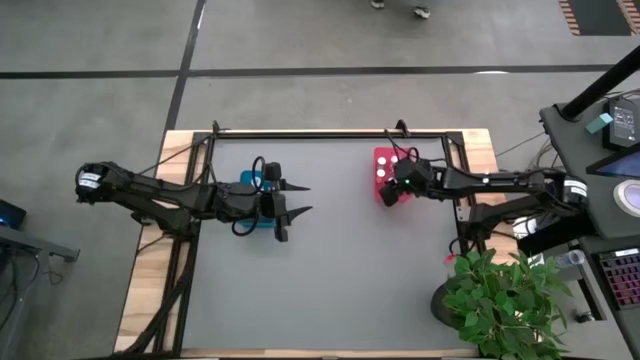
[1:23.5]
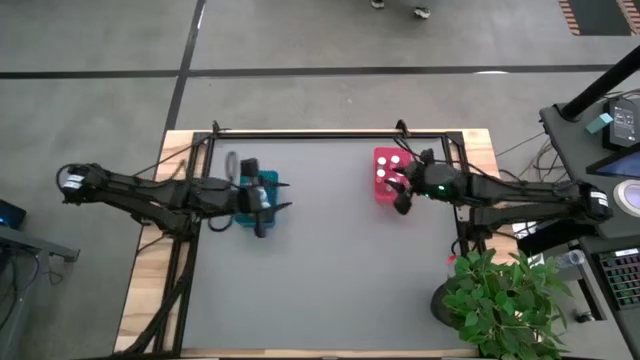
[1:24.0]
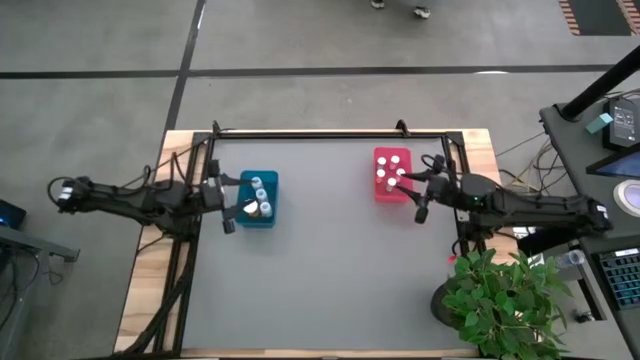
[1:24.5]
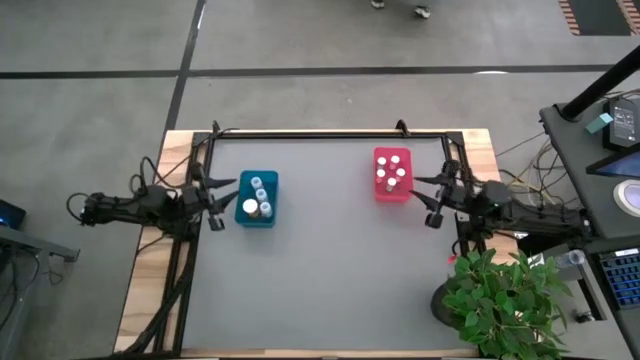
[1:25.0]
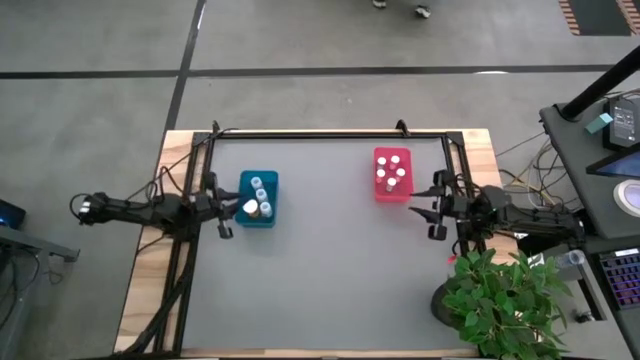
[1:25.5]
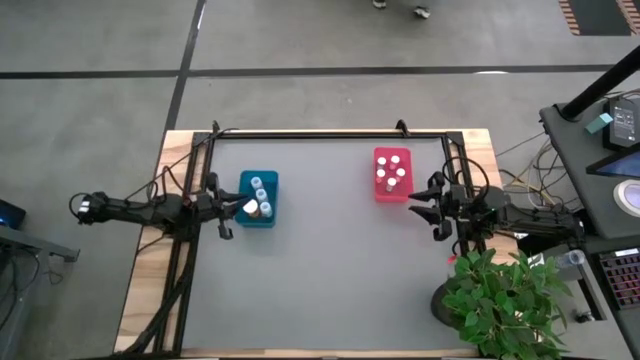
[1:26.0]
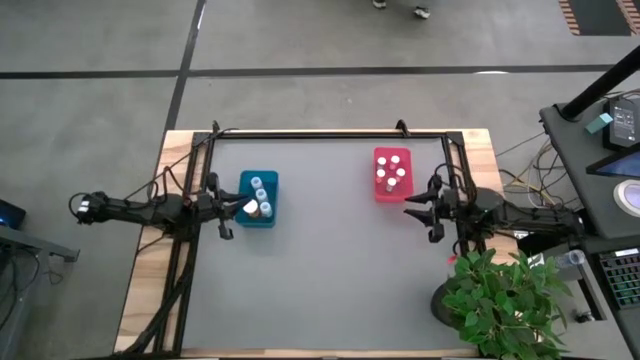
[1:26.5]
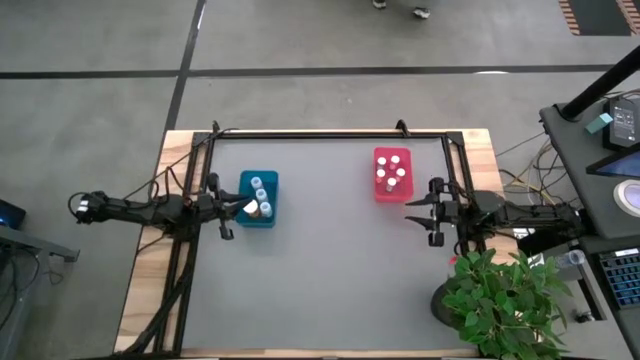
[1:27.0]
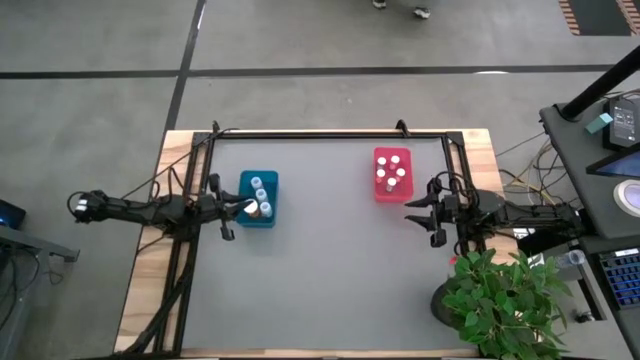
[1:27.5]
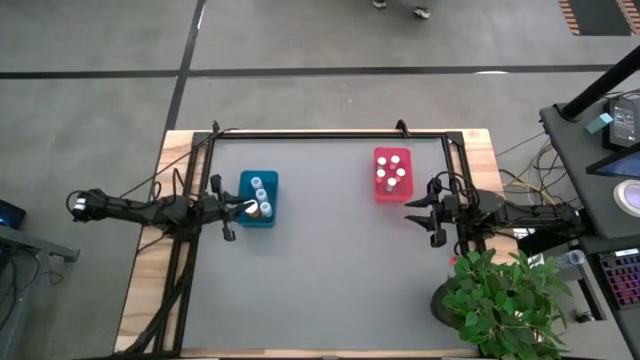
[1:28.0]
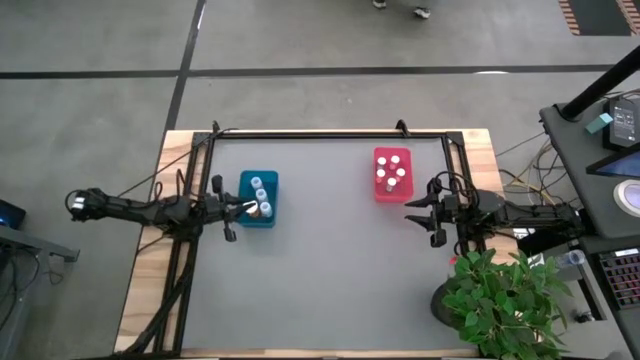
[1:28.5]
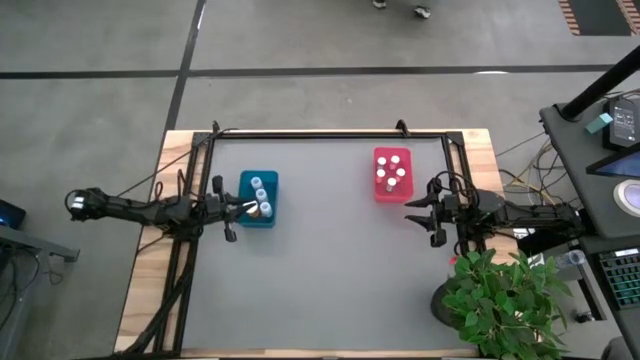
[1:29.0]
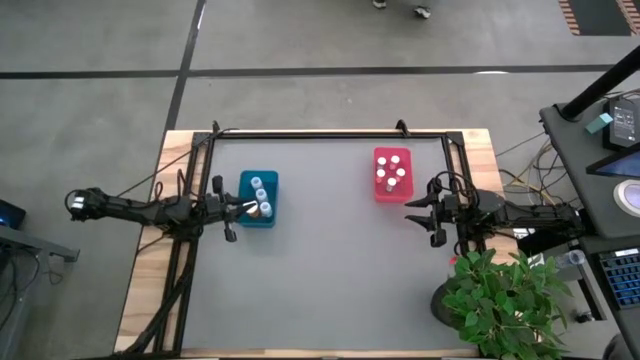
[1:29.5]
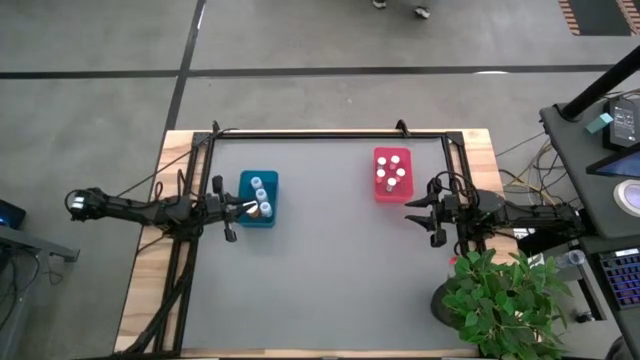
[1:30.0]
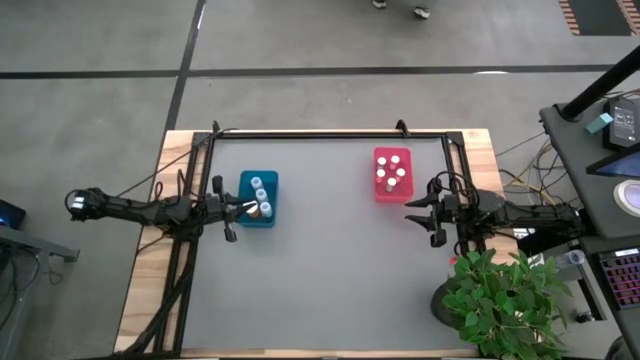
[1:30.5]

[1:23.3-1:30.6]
Task: Pick and place medicine bottles into bin by pill shape (circle, oval)
Return to Home Position

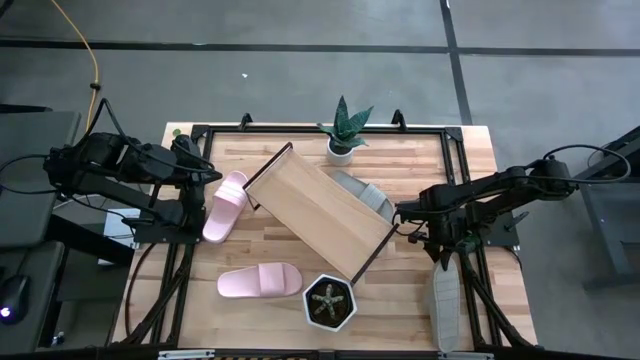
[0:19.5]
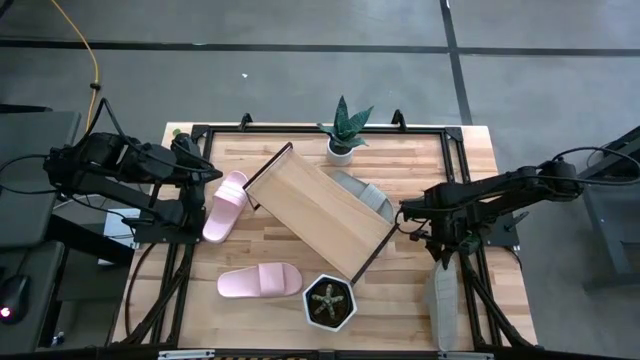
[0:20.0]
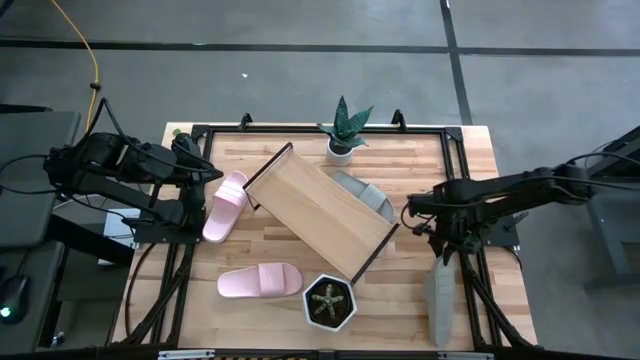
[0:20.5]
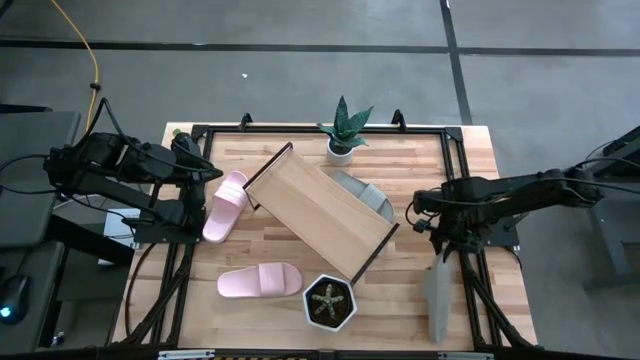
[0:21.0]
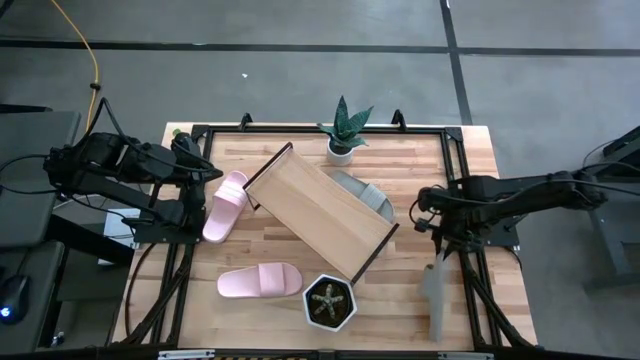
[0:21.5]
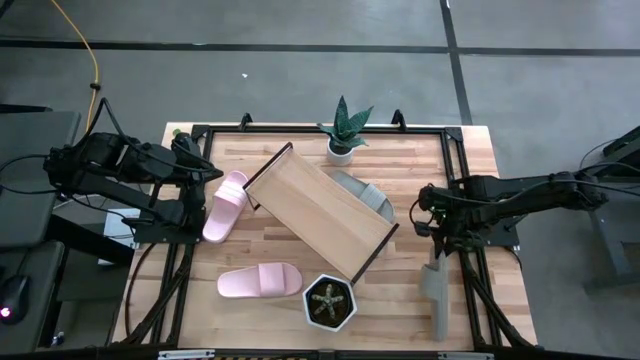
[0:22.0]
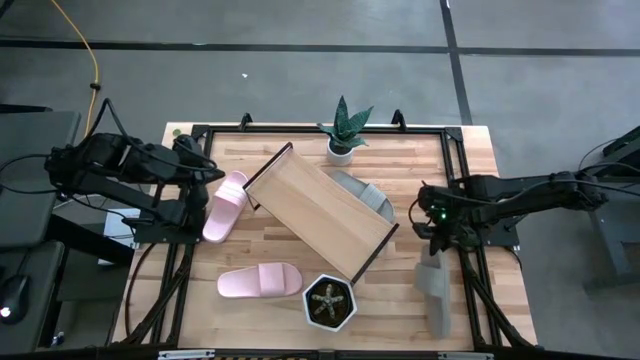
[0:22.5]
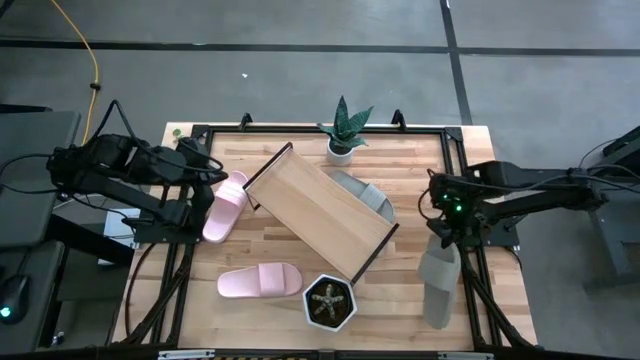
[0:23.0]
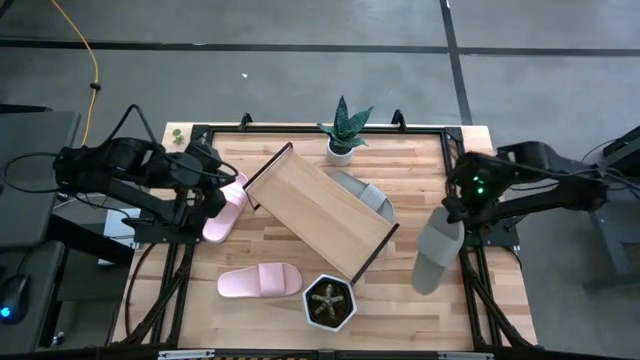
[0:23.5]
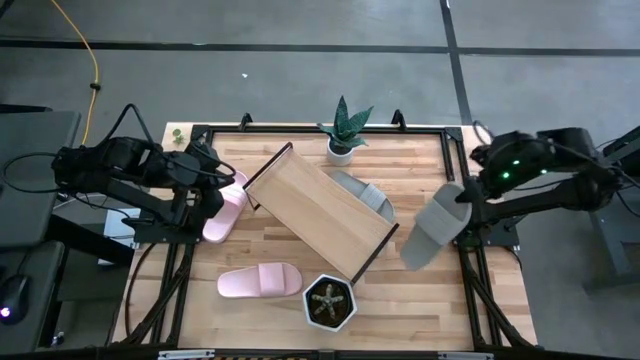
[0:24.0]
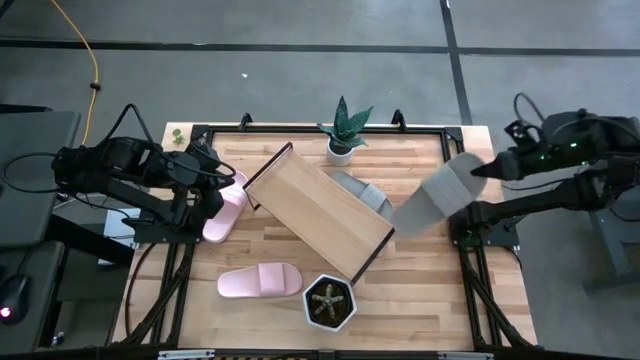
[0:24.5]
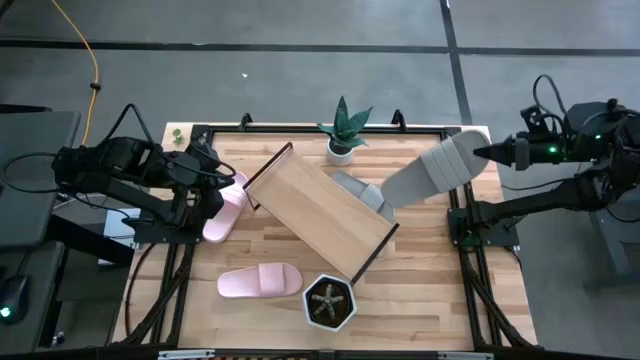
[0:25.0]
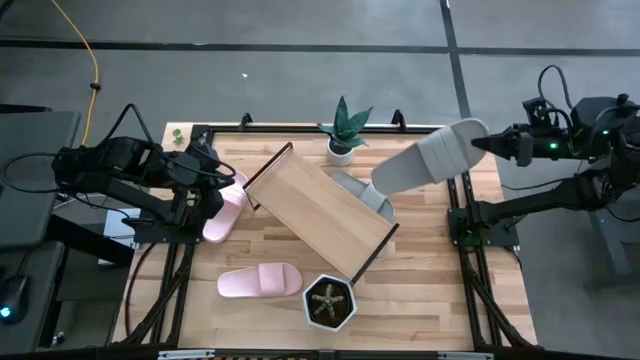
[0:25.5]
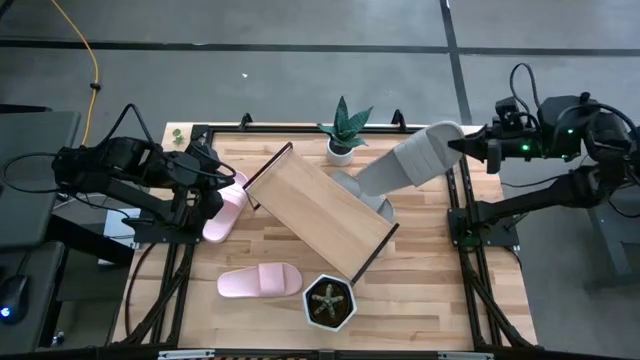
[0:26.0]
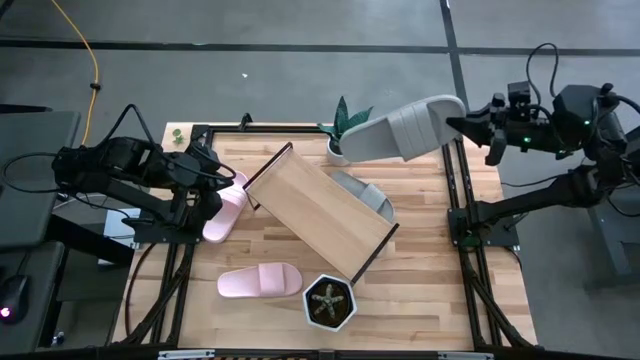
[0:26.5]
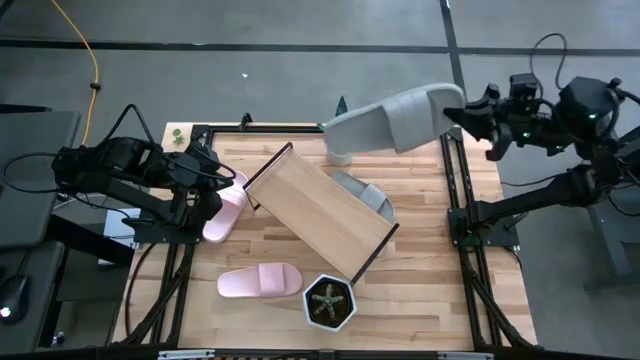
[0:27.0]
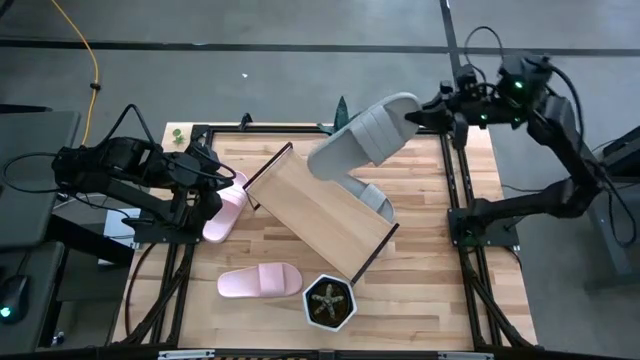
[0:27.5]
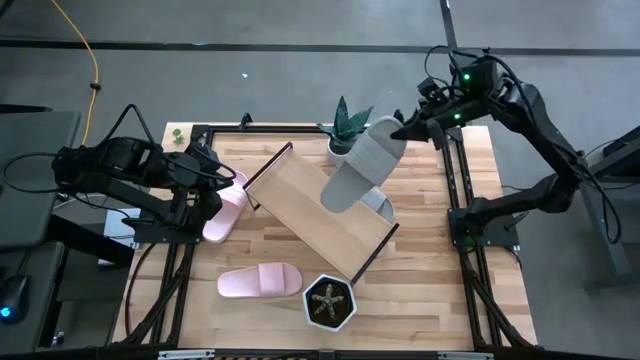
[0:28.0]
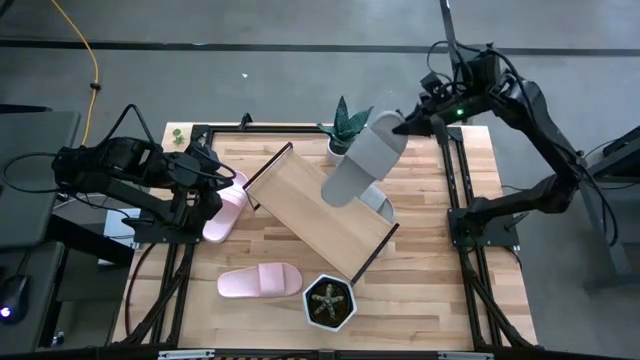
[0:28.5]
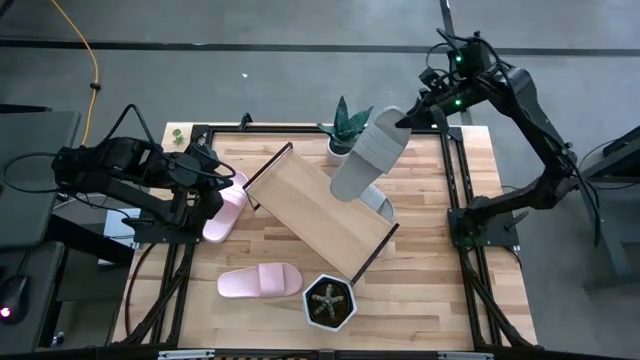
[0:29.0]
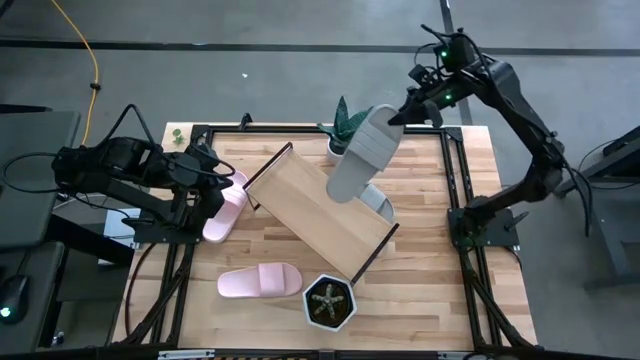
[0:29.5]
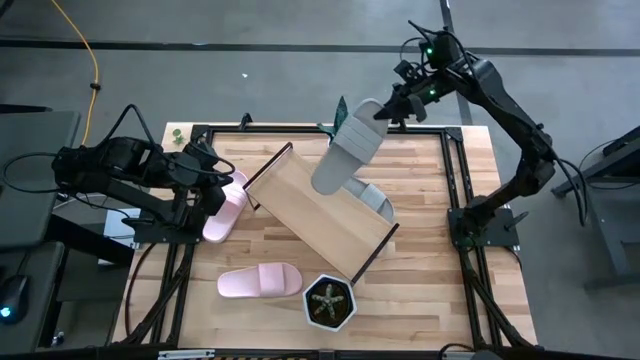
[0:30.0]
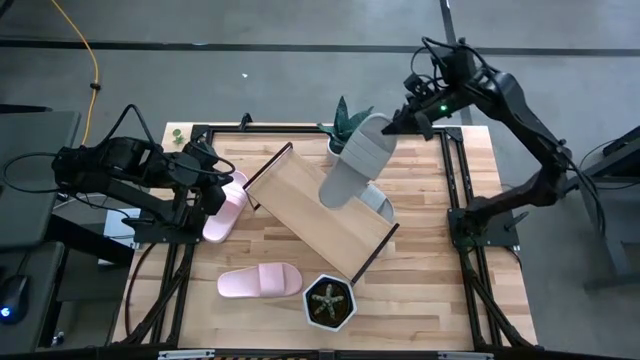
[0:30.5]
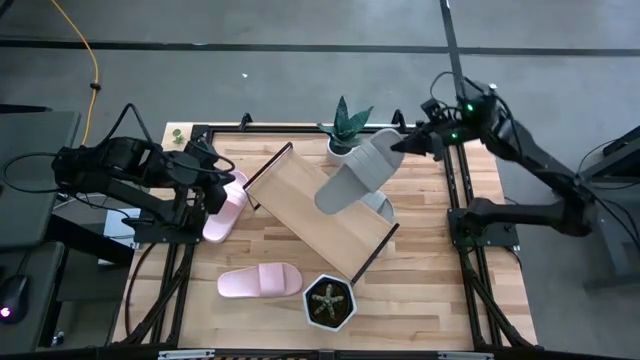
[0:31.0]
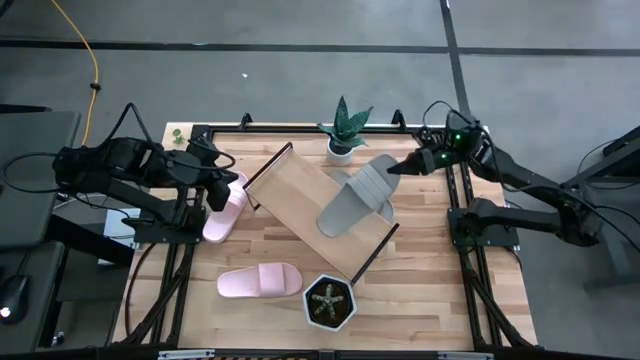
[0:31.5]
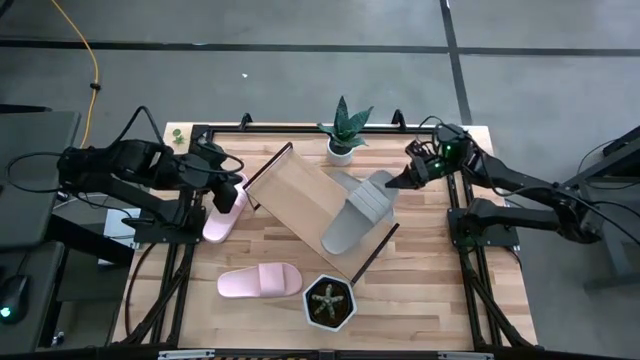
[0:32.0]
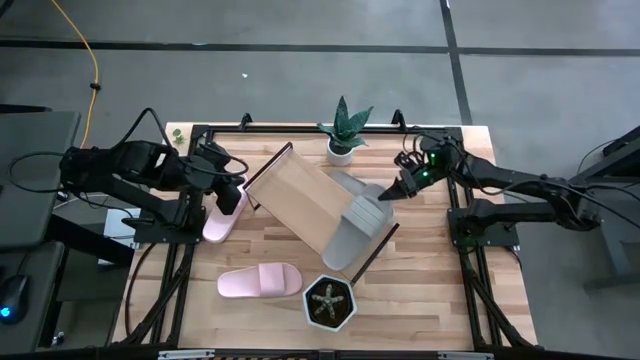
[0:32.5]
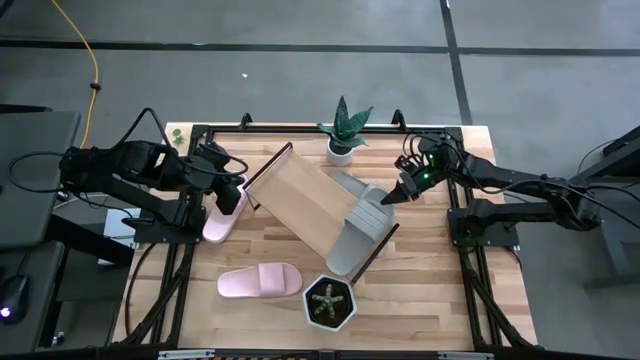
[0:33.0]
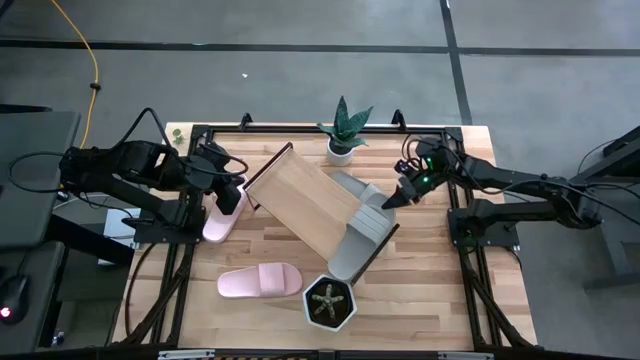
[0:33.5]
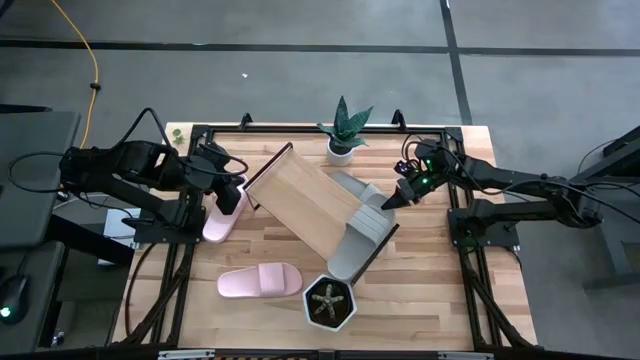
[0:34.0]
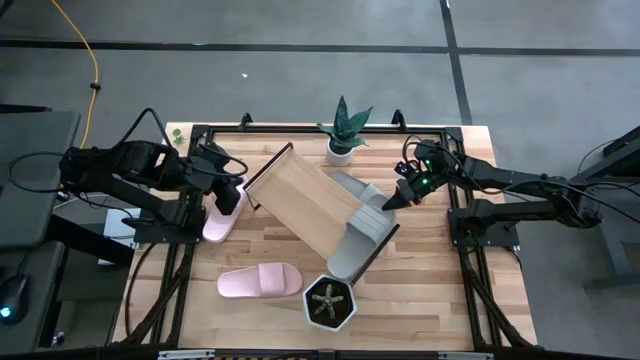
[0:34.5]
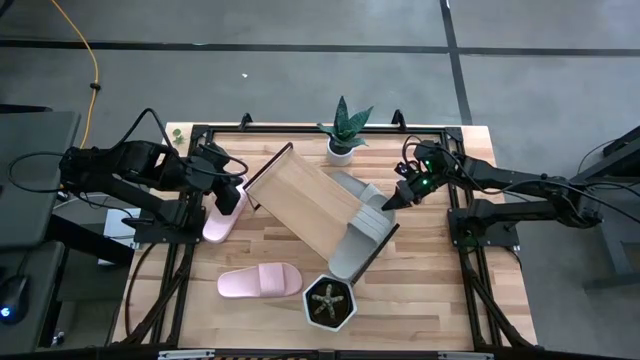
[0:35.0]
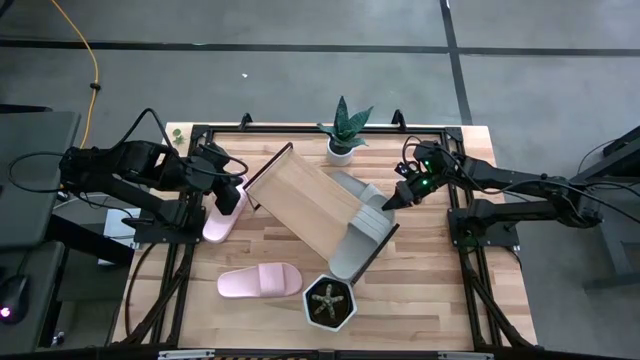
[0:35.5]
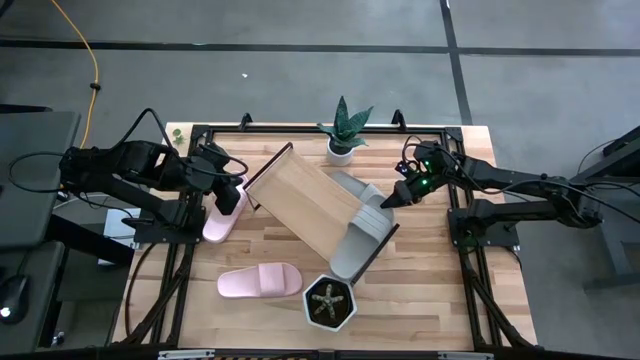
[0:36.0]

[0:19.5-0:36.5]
Task: Pick and place slides into the shelf
Put the bottom gray slipper on the shelf
